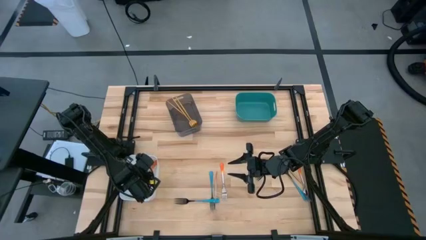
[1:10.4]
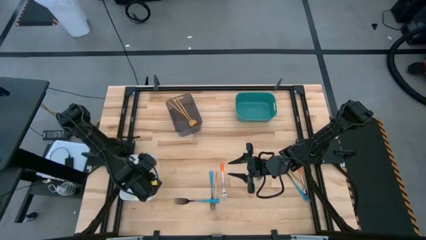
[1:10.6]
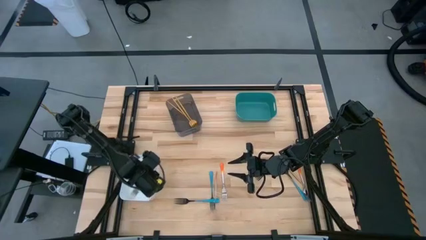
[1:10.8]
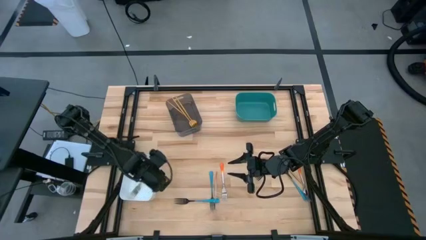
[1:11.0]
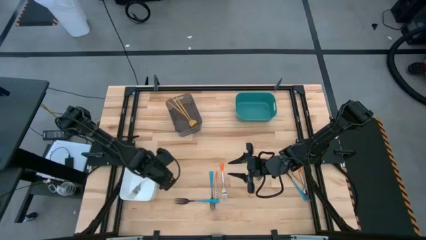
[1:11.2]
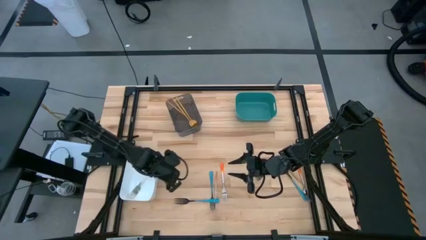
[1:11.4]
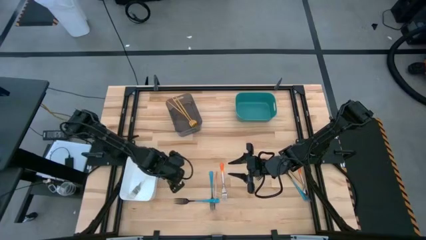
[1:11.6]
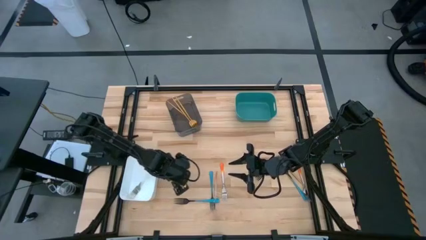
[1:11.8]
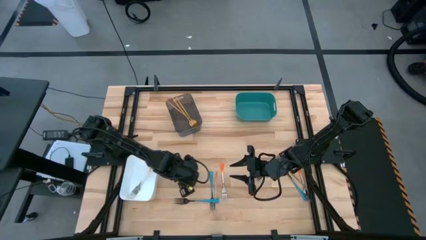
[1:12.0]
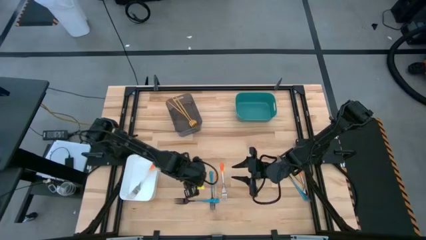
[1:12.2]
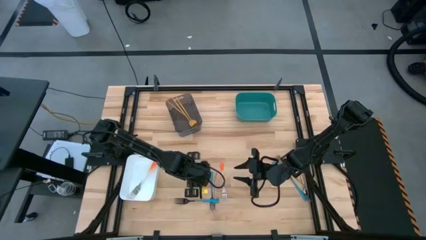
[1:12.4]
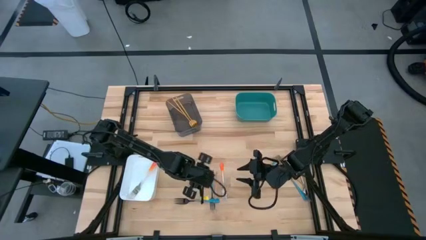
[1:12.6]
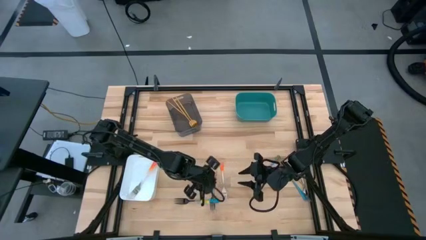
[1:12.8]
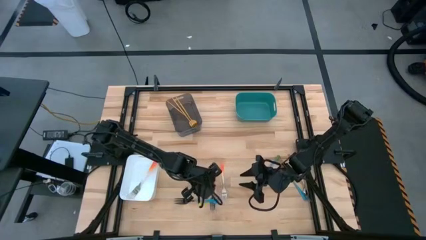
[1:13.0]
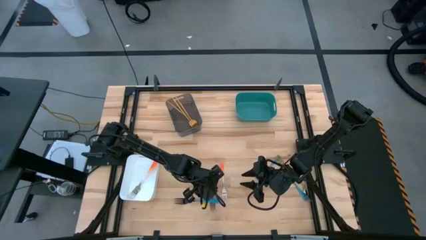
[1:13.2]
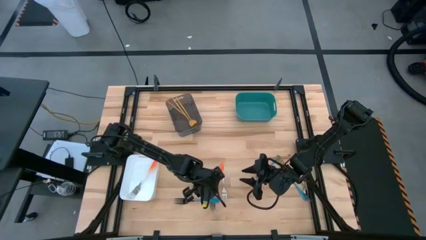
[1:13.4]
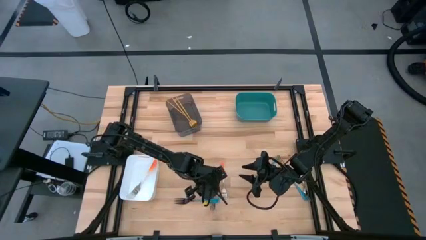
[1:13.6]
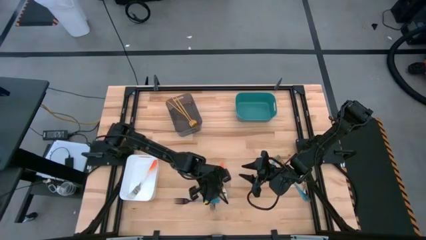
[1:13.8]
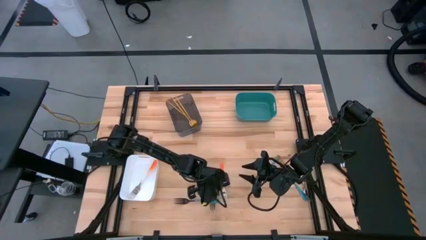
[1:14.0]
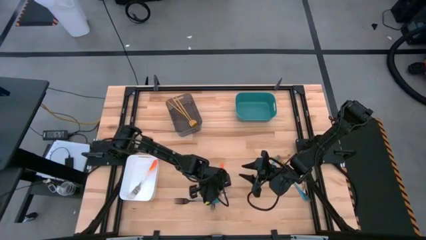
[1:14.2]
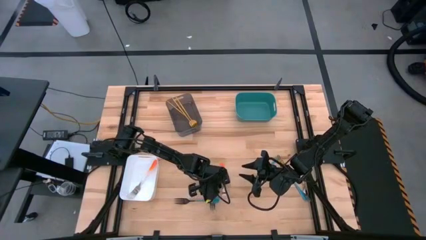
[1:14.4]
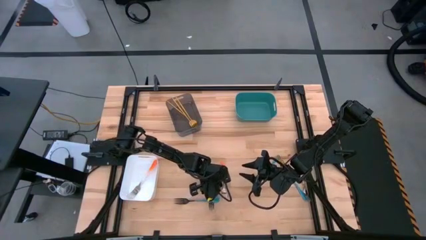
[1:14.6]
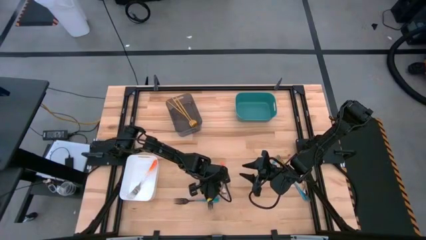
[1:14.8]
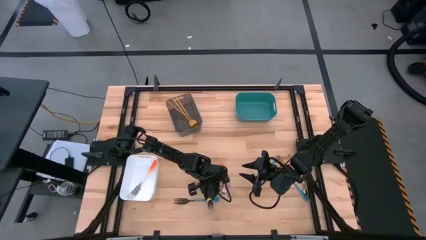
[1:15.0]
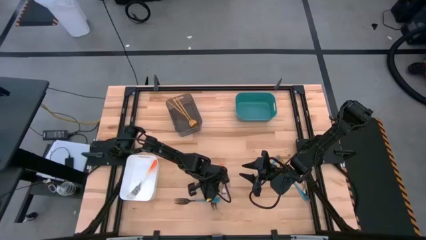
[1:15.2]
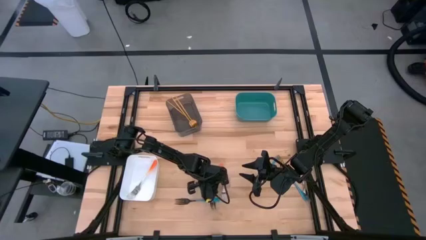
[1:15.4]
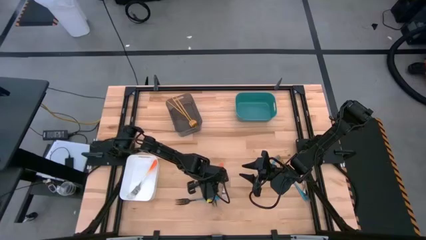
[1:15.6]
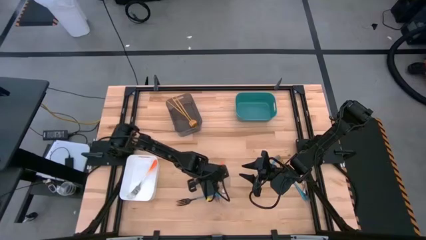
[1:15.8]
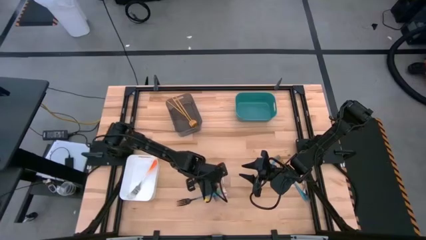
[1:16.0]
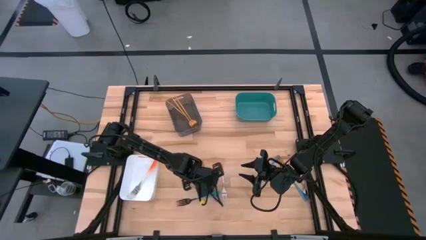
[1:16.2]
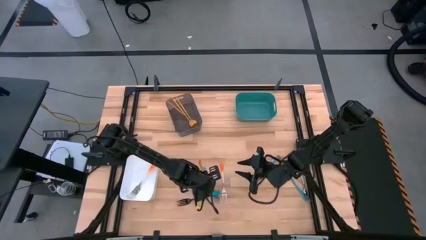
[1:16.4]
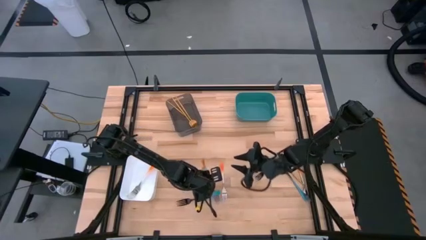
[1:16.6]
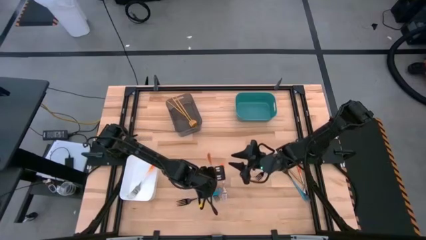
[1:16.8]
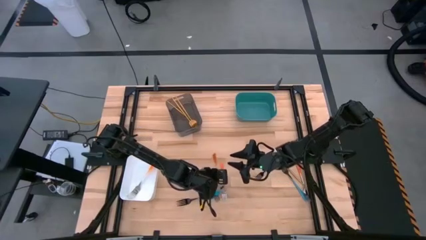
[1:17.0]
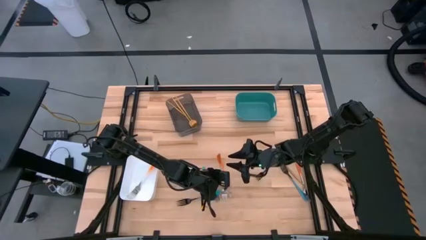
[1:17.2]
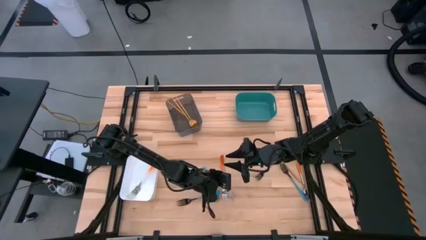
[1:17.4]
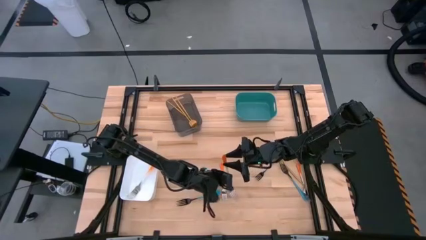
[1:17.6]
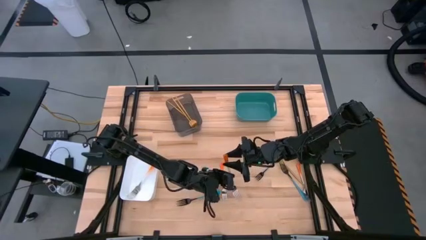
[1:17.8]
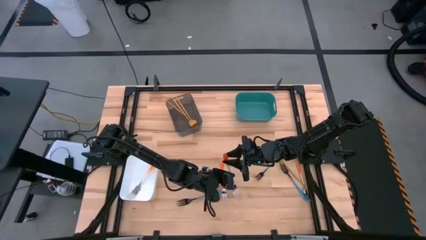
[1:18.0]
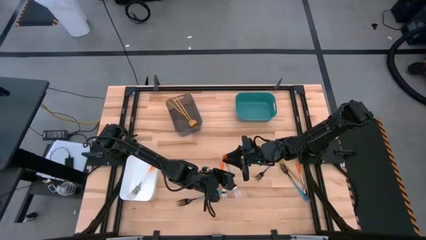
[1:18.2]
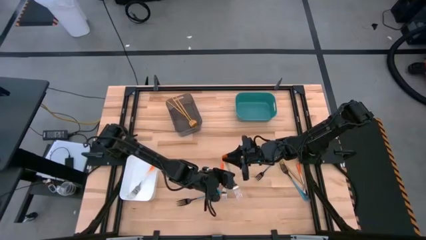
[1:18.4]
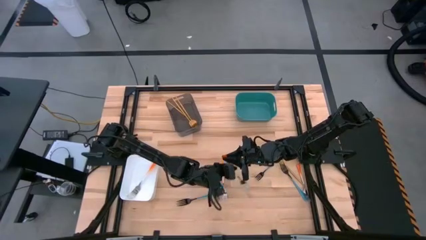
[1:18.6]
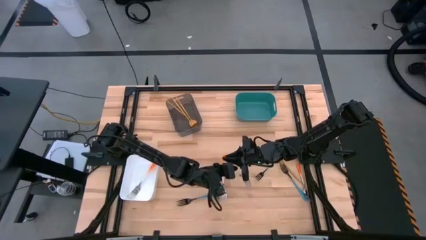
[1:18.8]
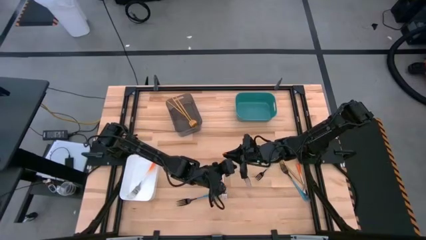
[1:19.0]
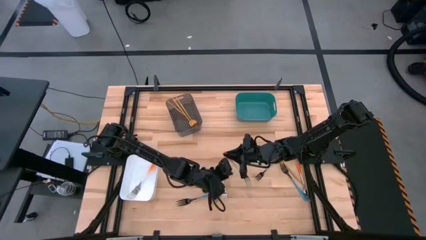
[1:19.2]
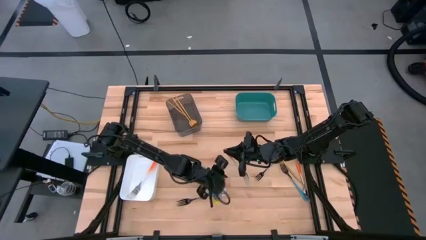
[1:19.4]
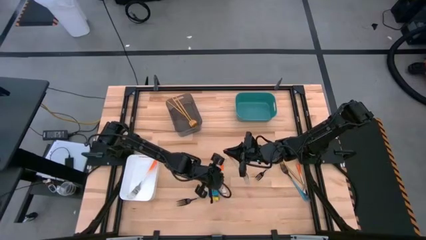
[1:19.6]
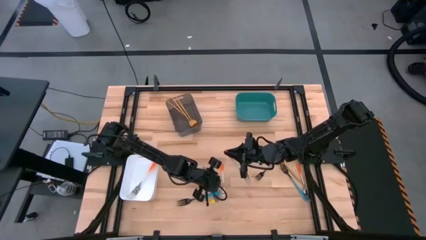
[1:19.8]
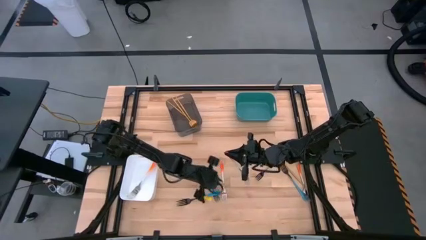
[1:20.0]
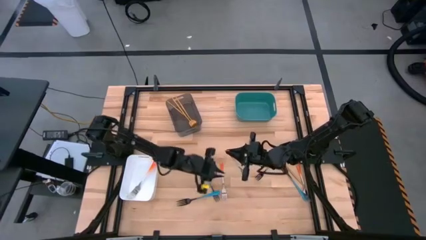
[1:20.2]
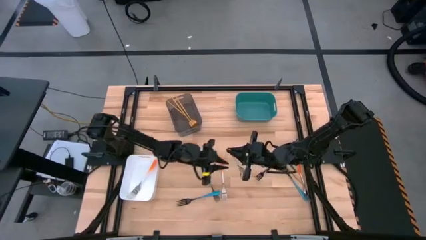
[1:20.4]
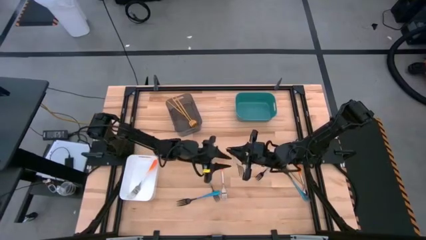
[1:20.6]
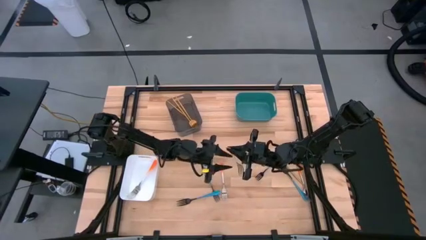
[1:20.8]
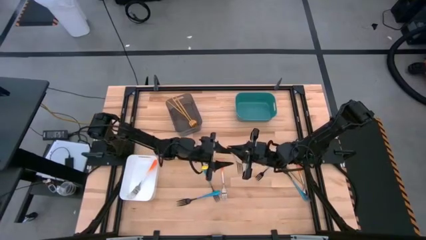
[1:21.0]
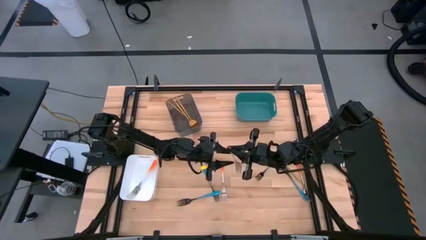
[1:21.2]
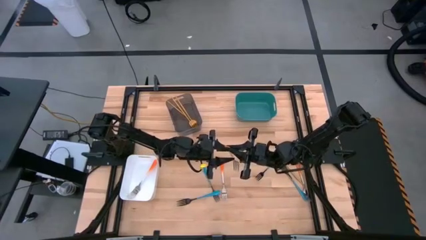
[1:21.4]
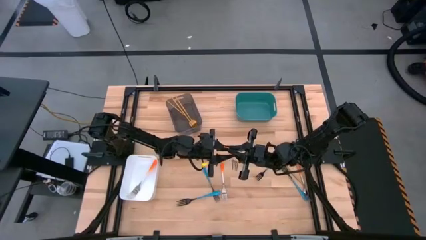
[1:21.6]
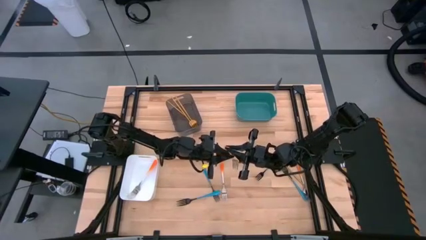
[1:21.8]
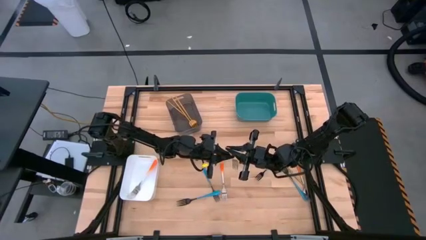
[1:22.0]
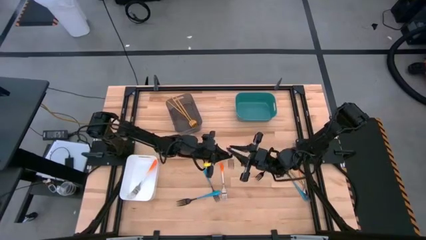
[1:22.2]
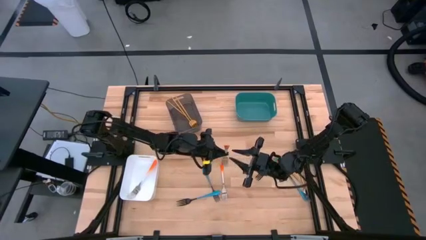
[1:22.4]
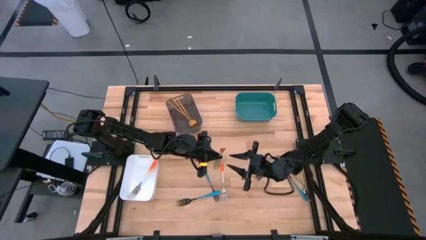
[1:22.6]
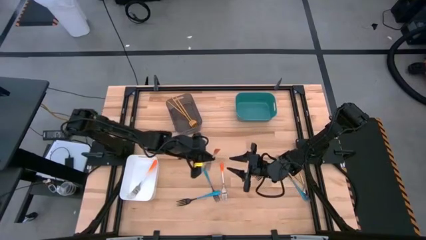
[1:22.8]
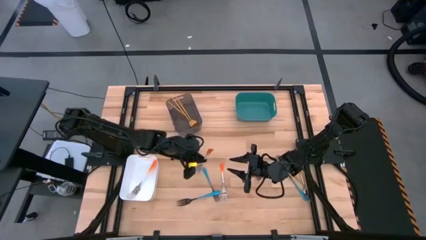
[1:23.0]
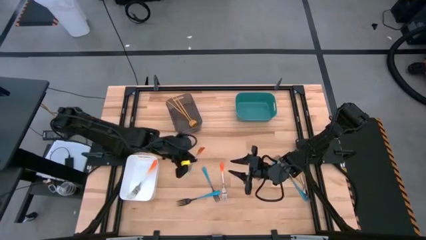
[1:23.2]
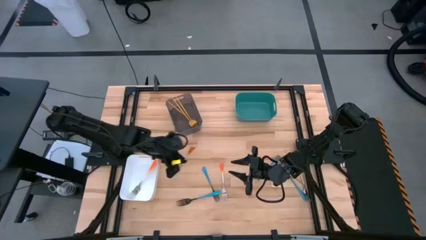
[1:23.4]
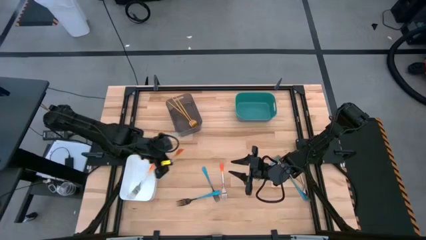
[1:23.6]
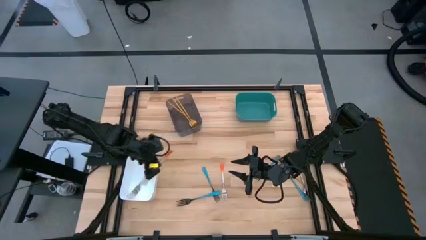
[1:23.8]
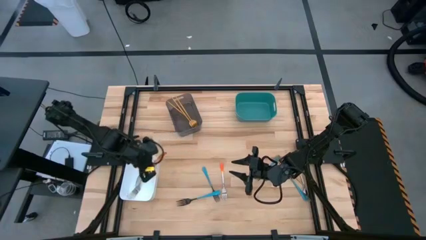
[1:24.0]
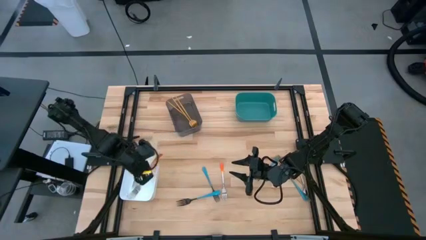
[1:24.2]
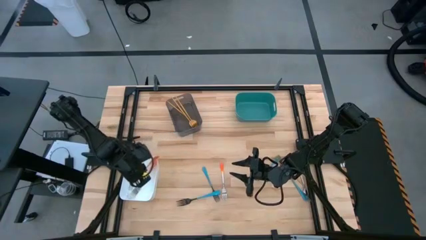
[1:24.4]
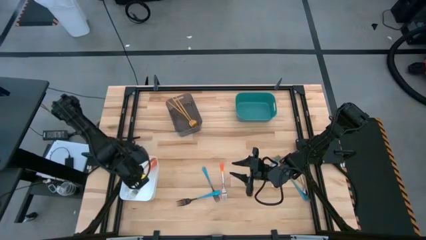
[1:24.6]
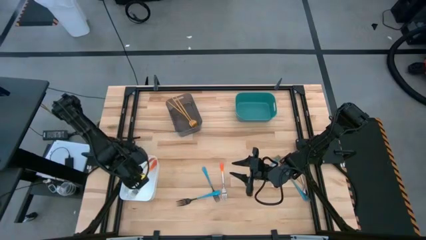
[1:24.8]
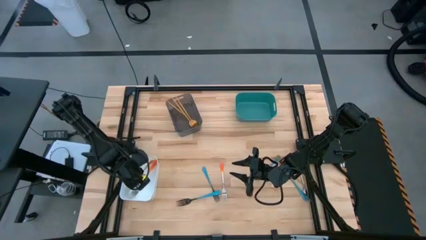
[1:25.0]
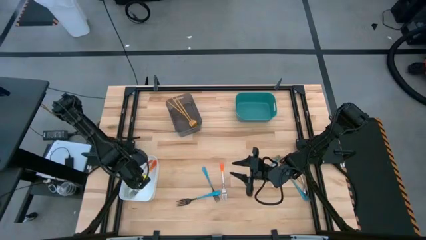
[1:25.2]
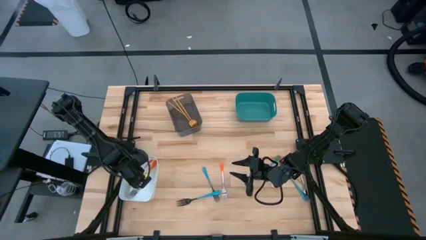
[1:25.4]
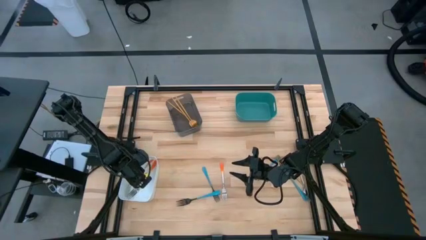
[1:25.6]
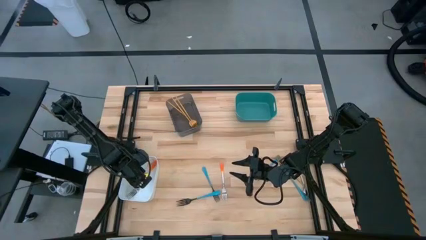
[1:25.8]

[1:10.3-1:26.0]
Task: Sort silverware by color (type)
Put the orange fork into the white bin

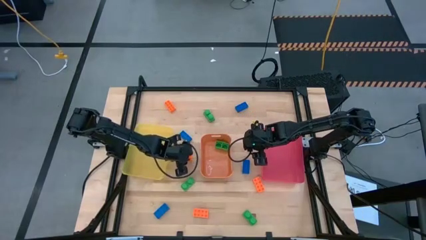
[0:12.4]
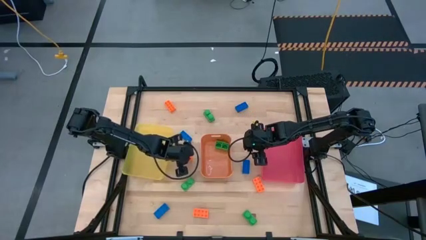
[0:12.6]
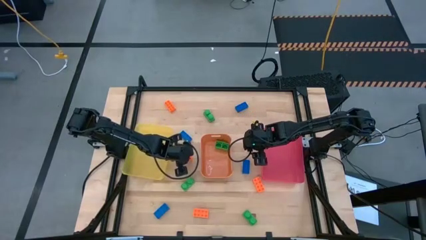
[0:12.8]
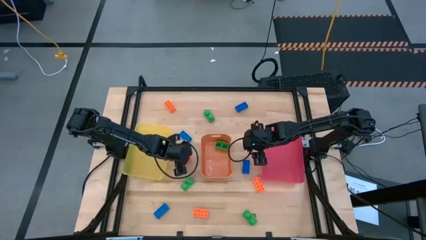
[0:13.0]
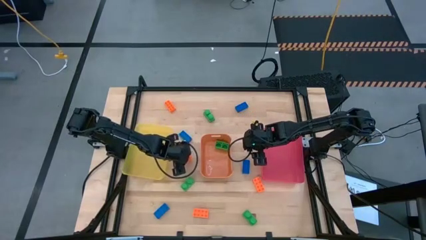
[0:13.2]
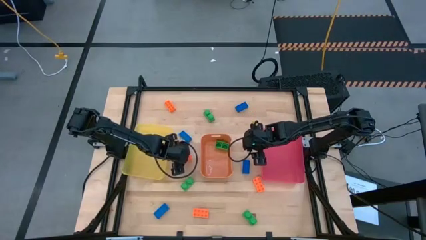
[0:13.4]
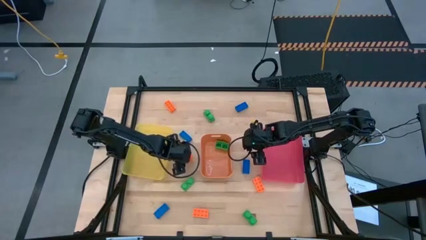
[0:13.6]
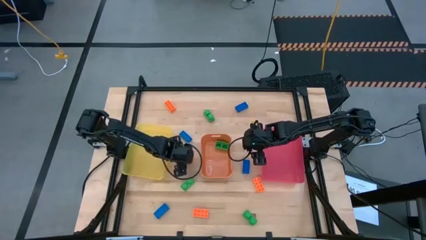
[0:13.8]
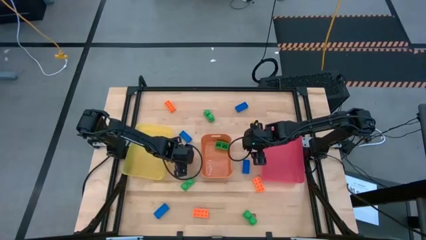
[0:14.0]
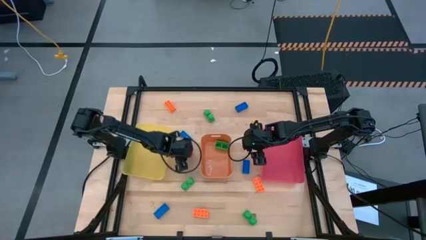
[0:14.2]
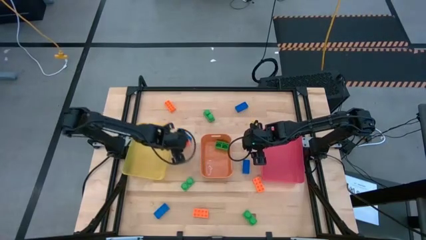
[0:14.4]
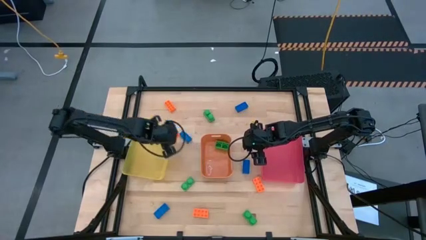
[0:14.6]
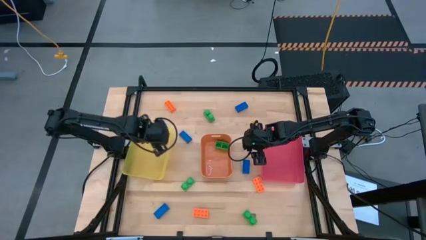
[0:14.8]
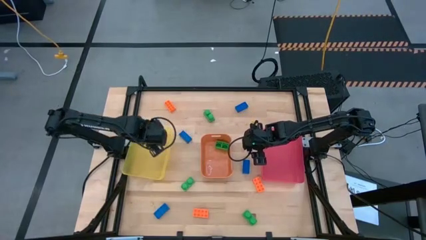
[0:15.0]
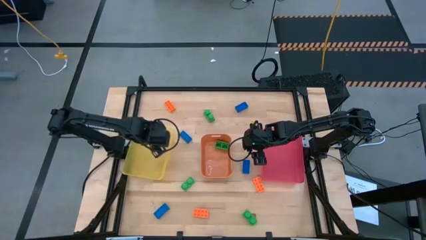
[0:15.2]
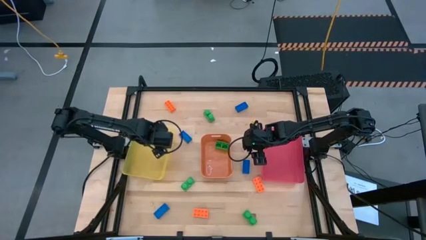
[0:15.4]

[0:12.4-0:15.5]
Task: Sort & place blocks by color
Put the orange game piece into the yellow bin
